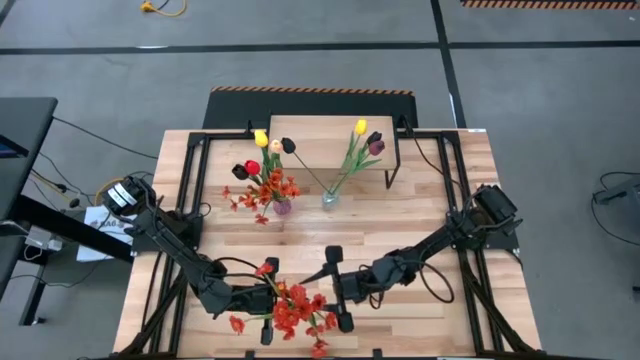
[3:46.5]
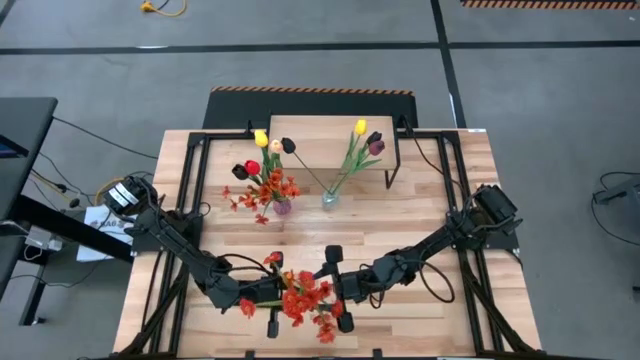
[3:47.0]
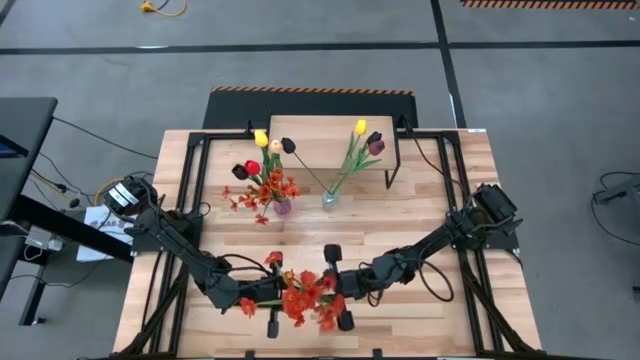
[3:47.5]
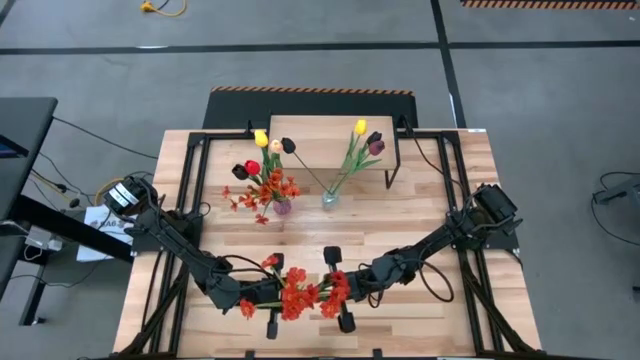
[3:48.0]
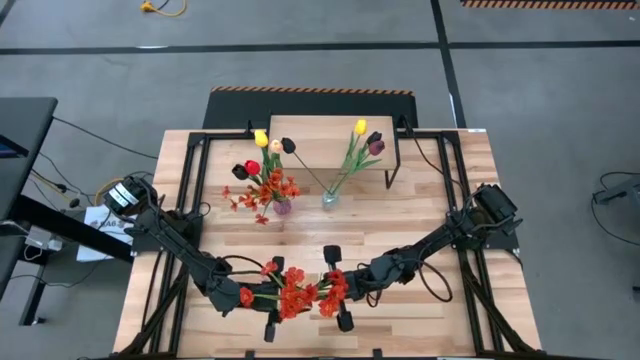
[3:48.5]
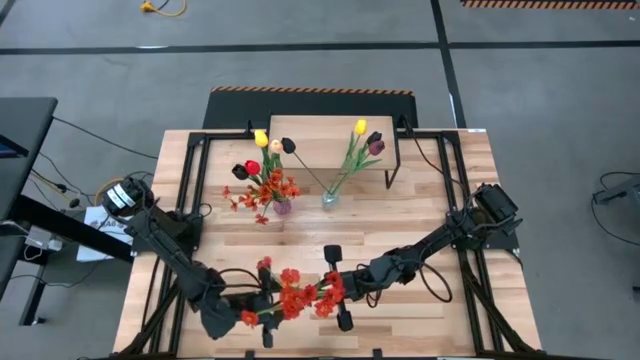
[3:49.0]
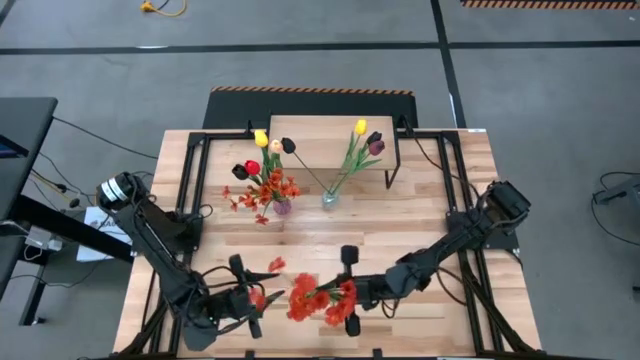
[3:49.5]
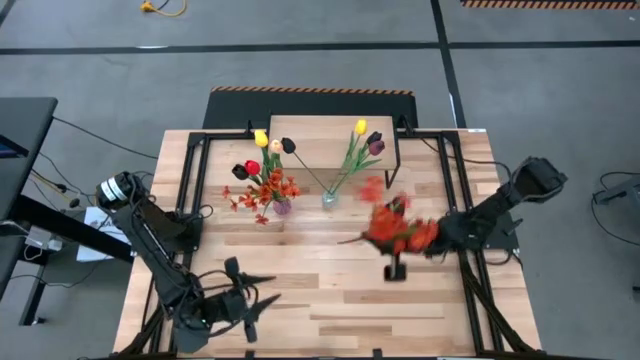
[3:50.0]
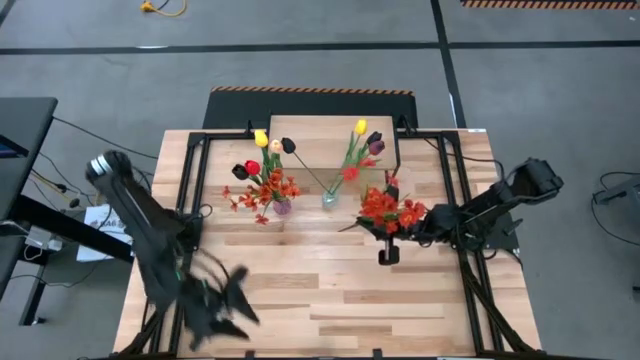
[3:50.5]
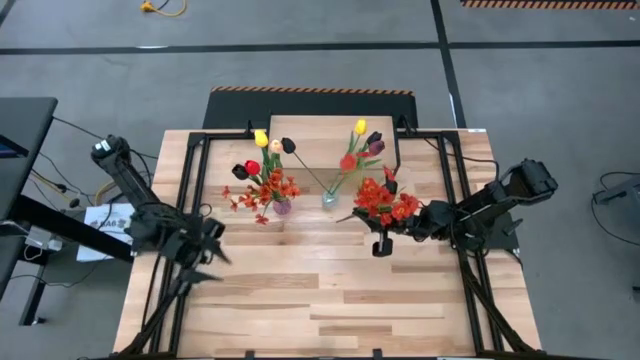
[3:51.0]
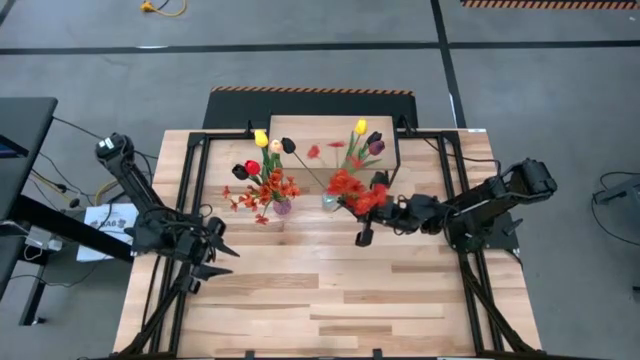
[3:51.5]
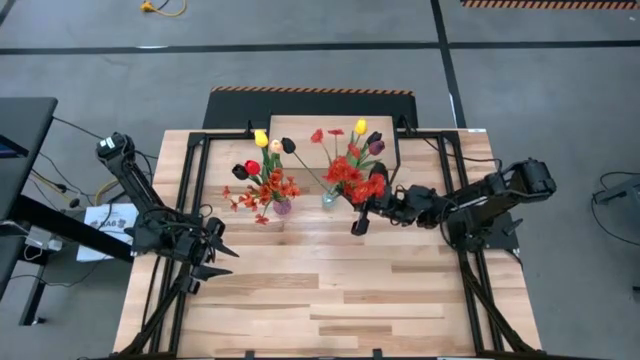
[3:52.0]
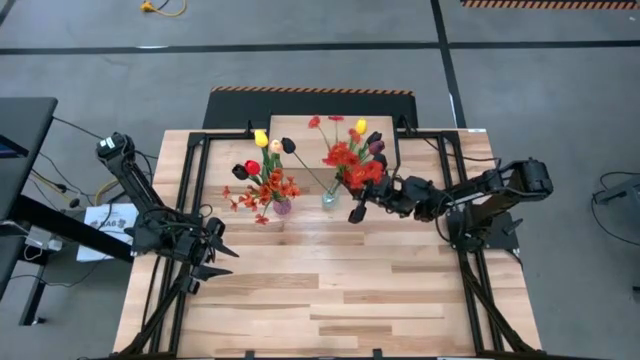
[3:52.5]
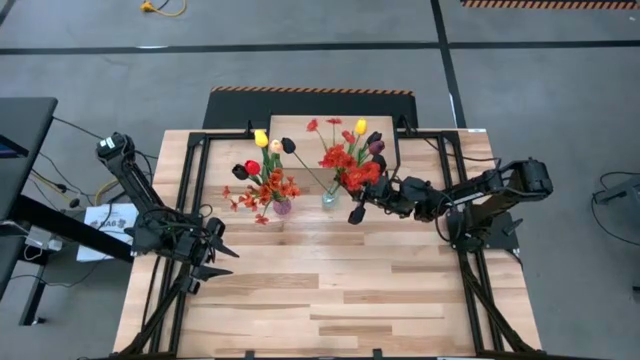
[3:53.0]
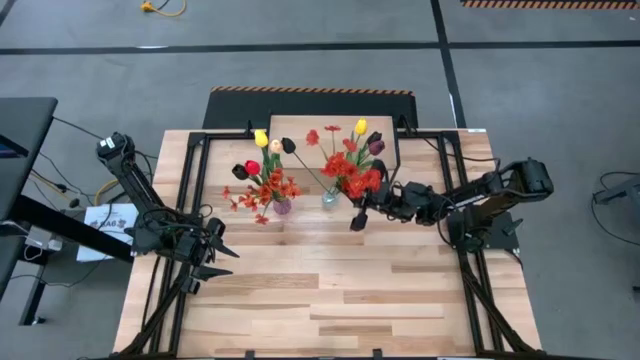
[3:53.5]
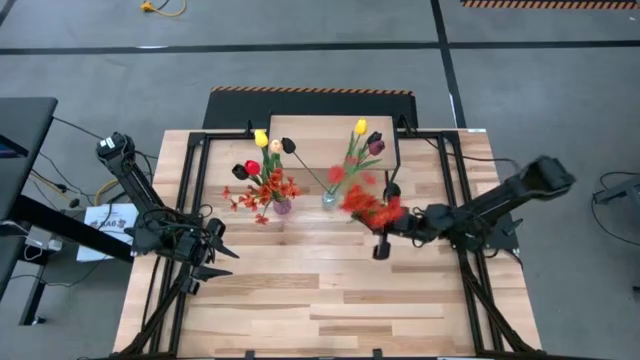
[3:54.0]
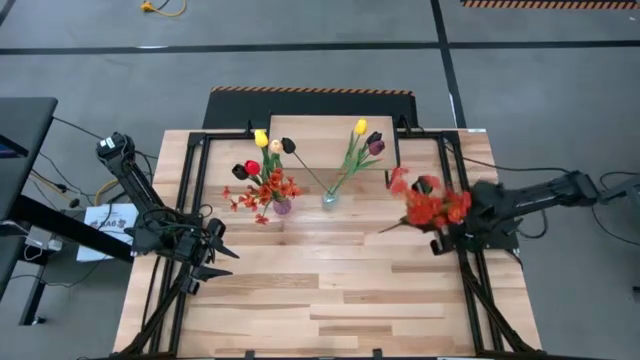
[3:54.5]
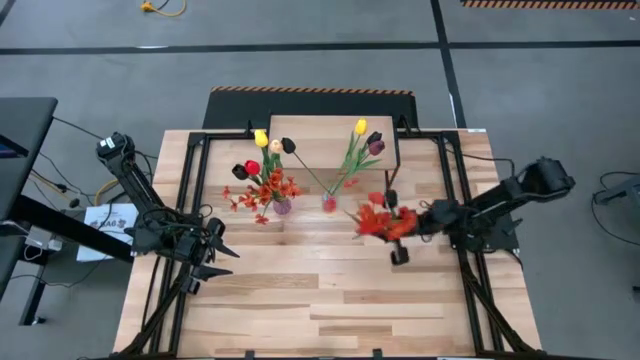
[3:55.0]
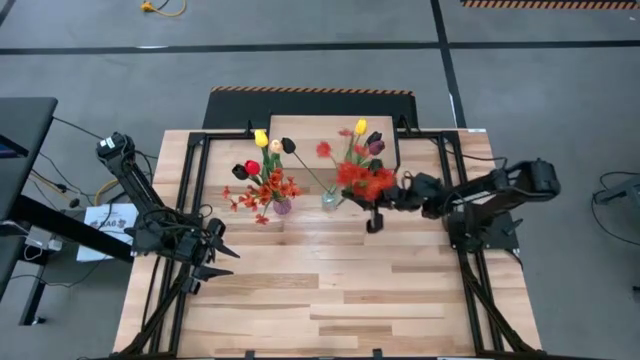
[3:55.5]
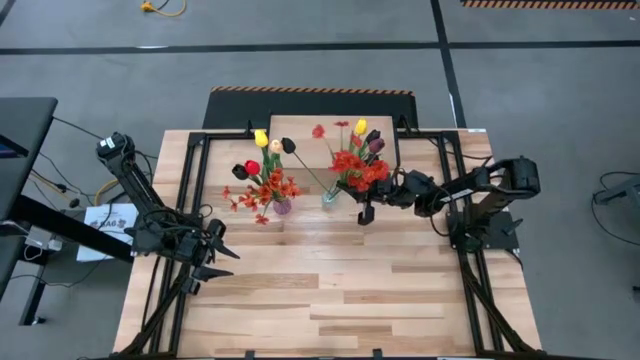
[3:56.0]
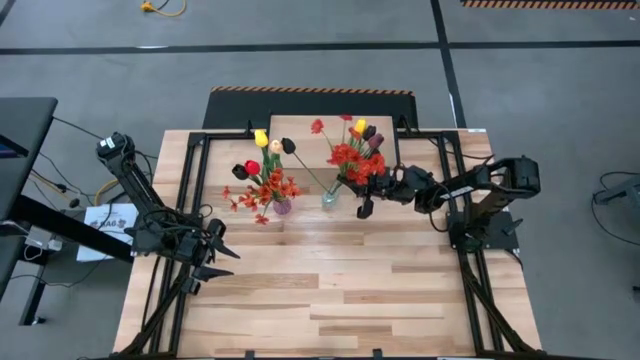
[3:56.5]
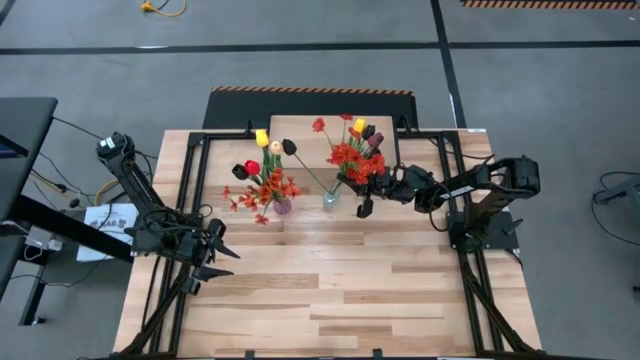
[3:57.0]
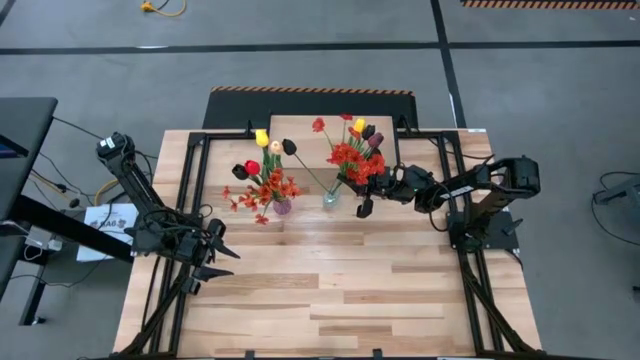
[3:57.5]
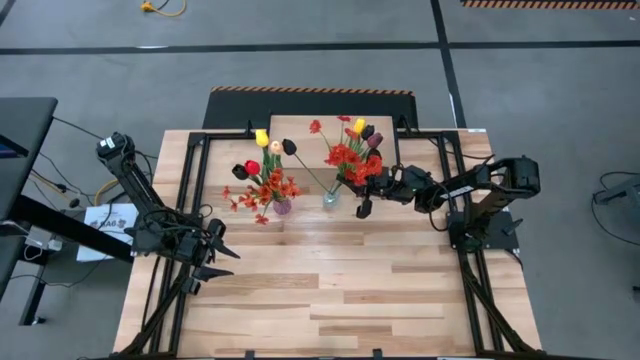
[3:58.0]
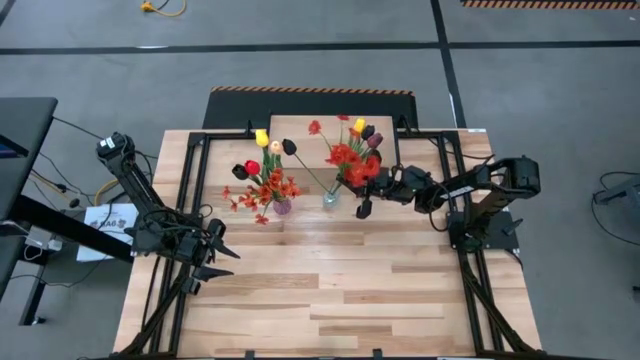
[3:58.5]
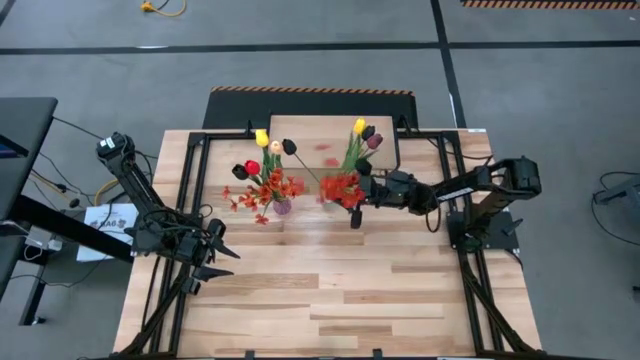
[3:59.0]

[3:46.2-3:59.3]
Task: Pick and place flowers into a vace then onto a shelf
Put the orange flower into the transparent vase

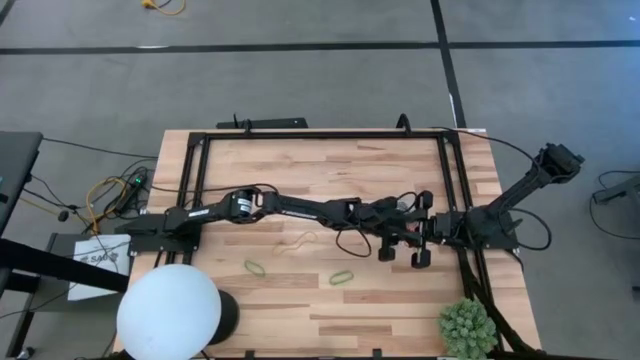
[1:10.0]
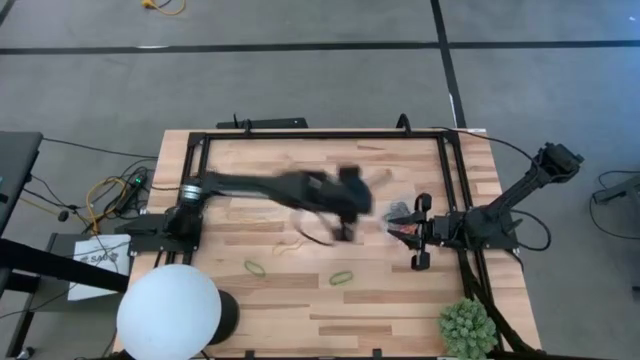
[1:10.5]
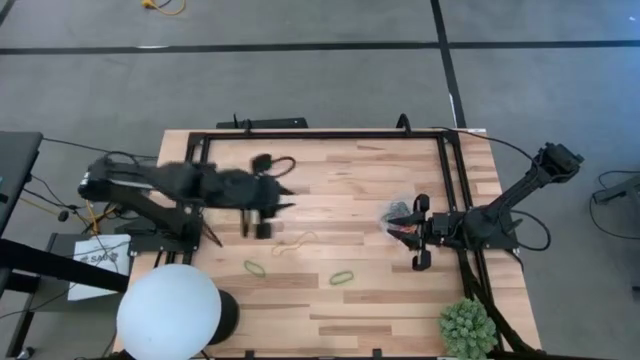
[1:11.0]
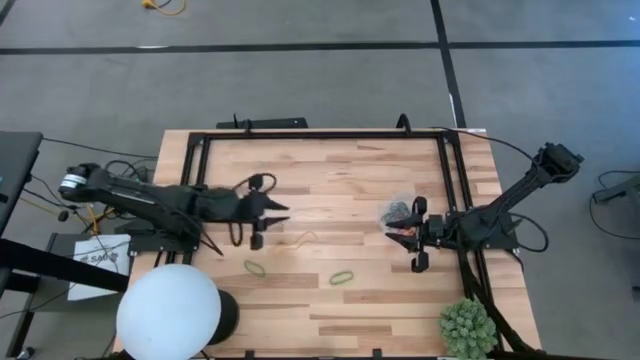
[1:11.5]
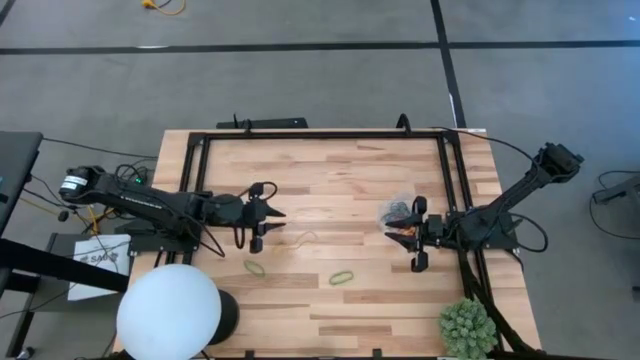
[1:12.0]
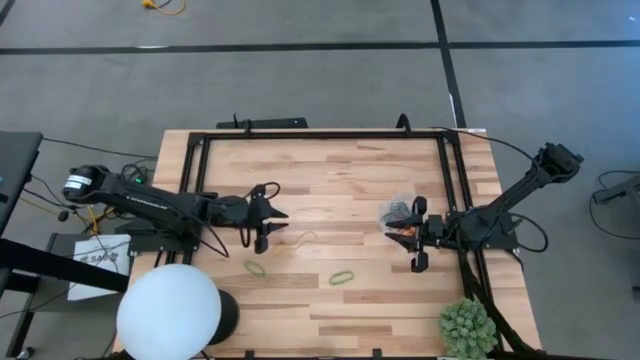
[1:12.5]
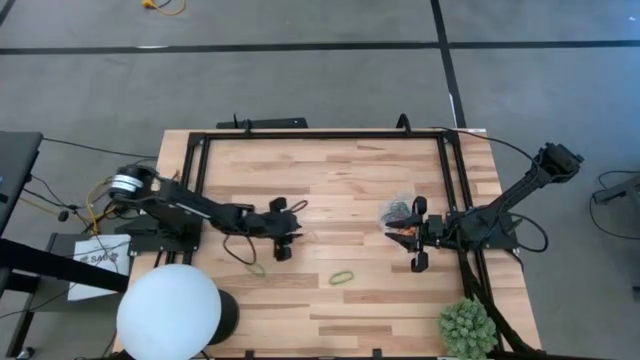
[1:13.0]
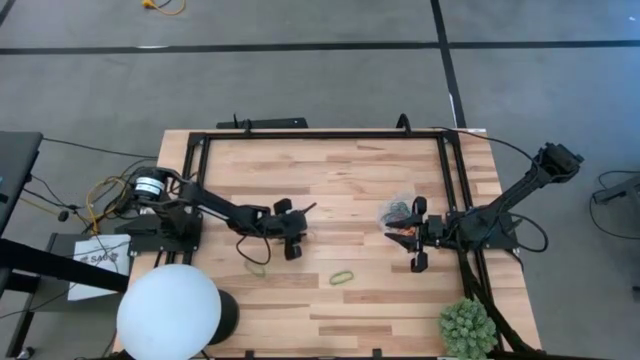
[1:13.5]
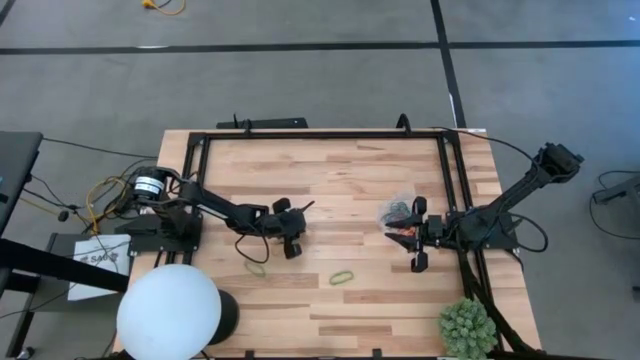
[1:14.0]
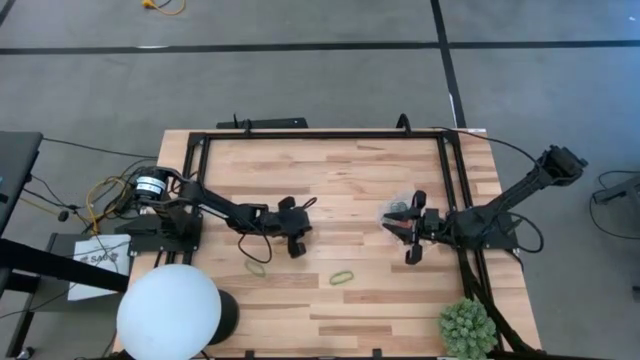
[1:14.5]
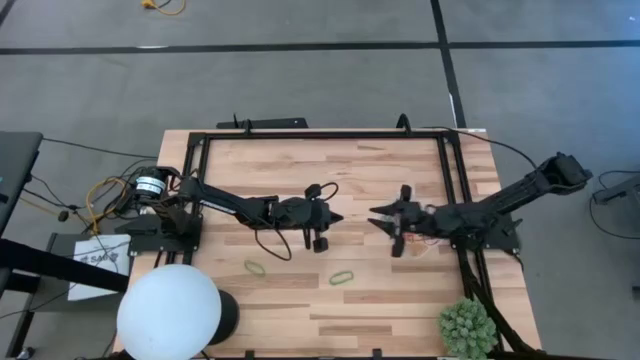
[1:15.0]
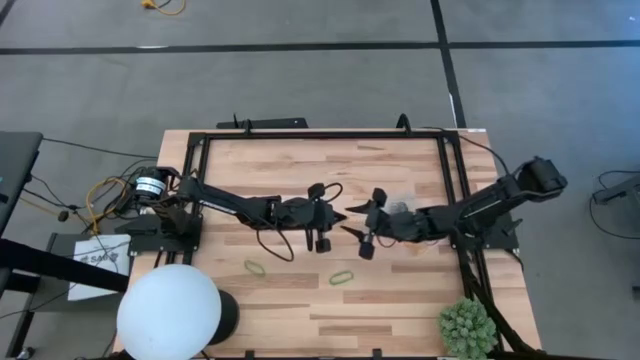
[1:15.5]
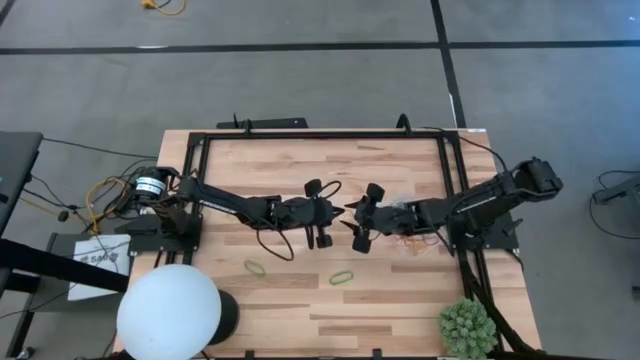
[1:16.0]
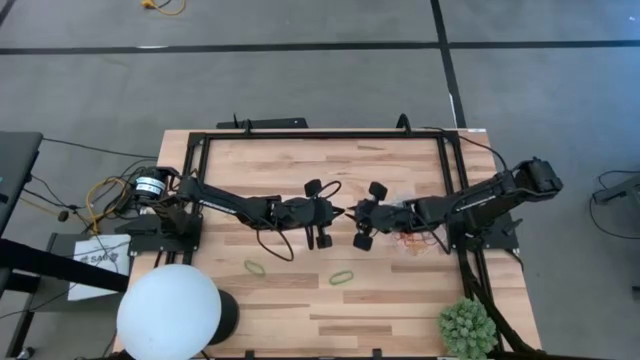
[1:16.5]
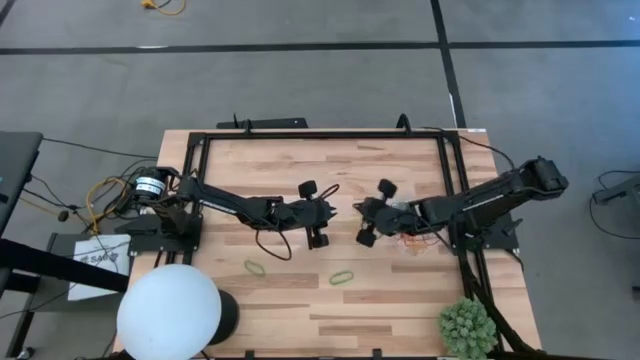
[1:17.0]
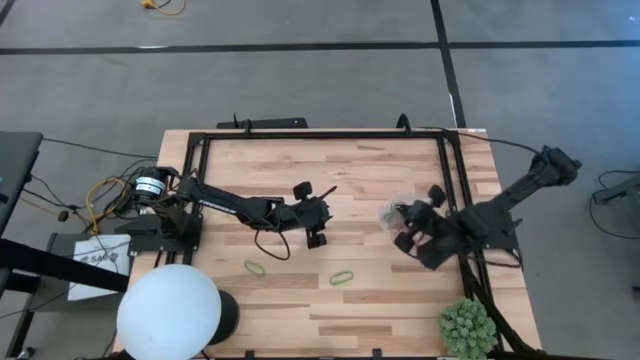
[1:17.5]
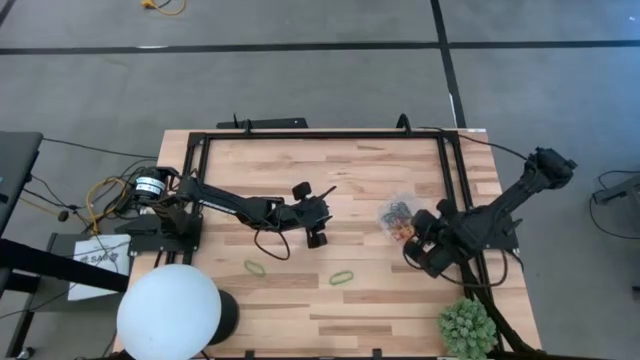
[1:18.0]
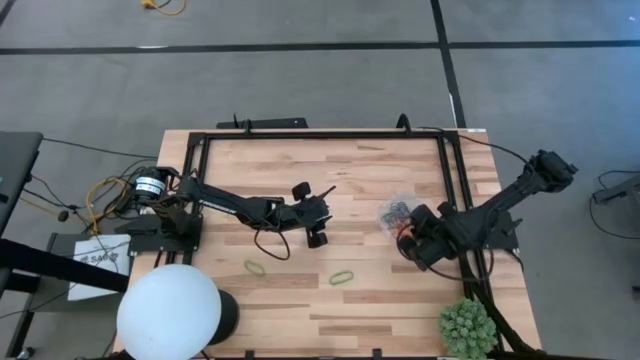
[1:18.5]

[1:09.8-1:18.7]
Task: Pick and place items into bin
Put the yellow rubber band into the transparent bin
